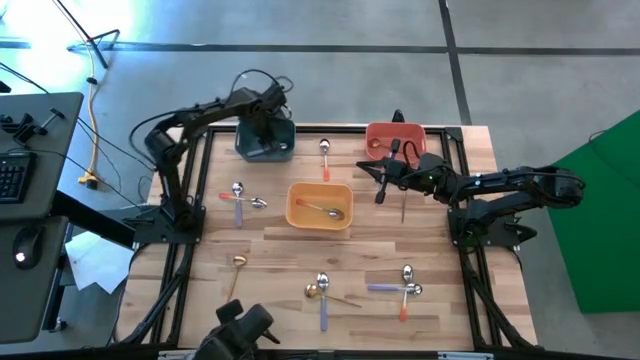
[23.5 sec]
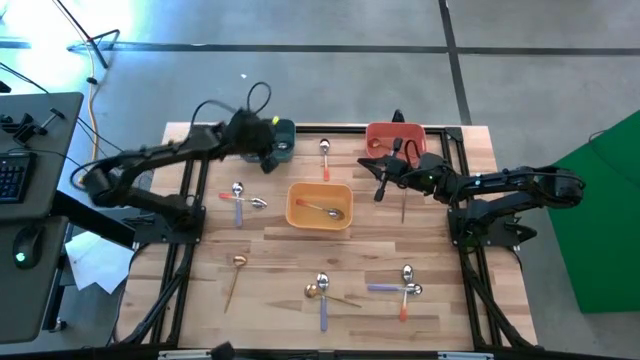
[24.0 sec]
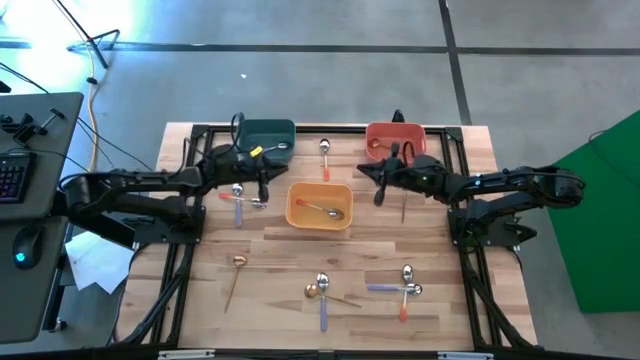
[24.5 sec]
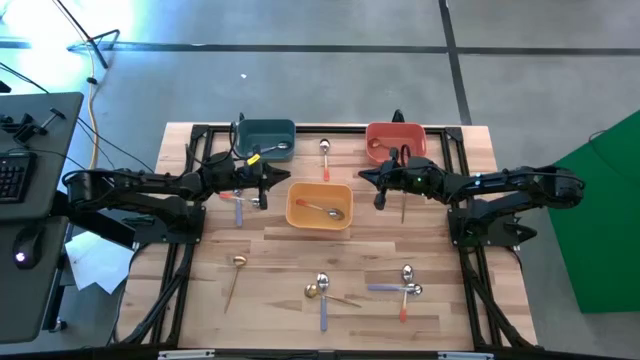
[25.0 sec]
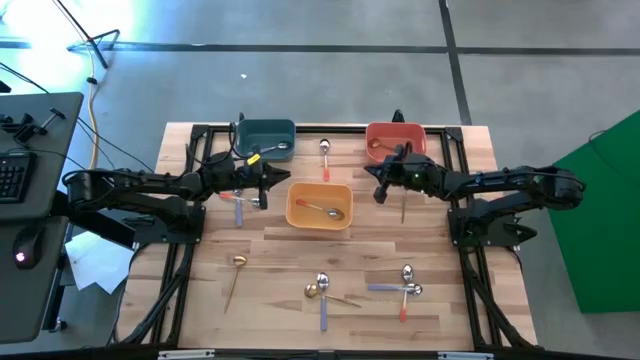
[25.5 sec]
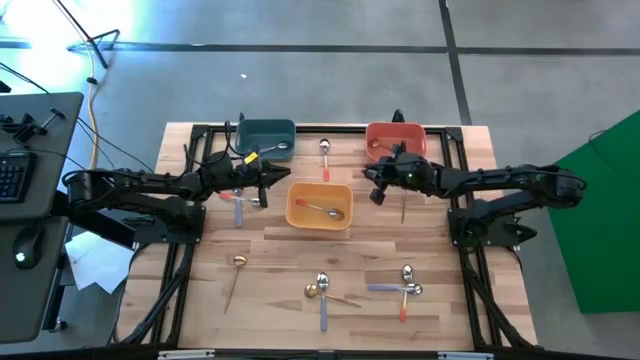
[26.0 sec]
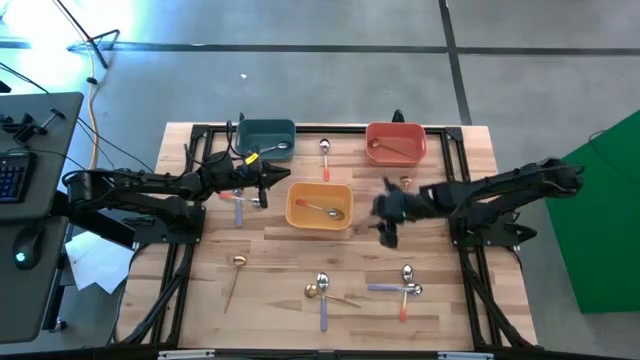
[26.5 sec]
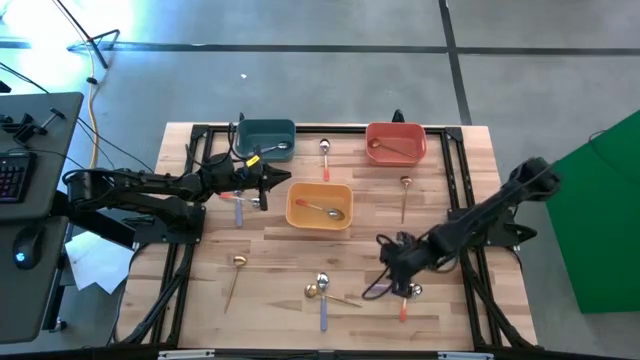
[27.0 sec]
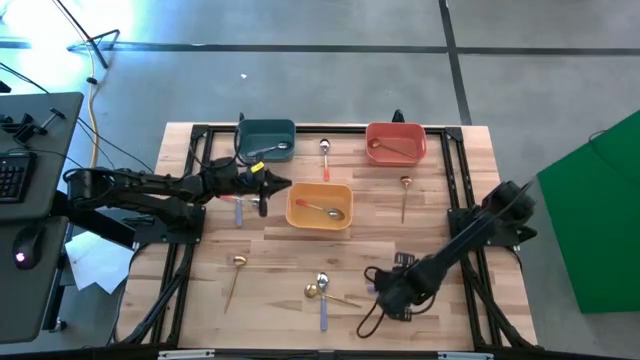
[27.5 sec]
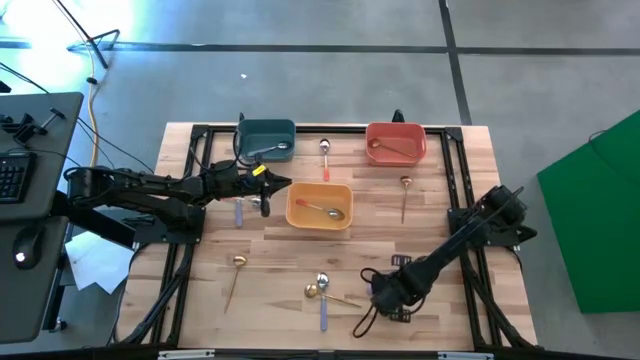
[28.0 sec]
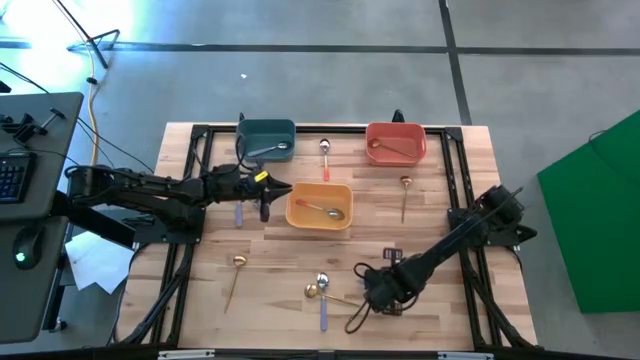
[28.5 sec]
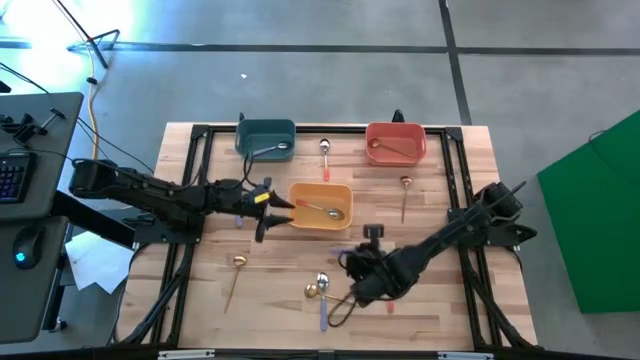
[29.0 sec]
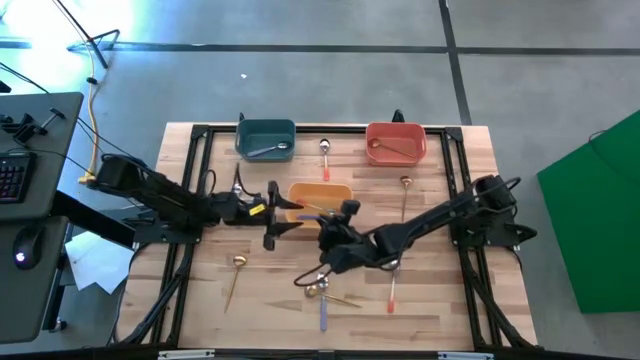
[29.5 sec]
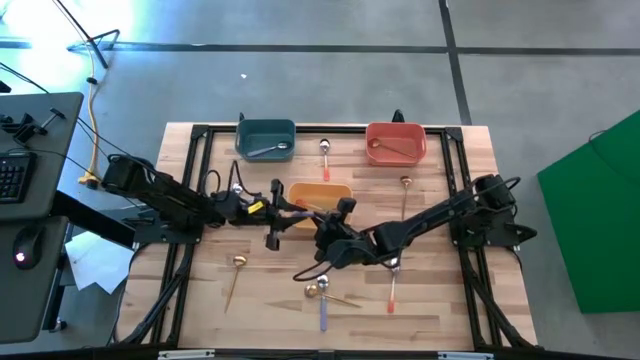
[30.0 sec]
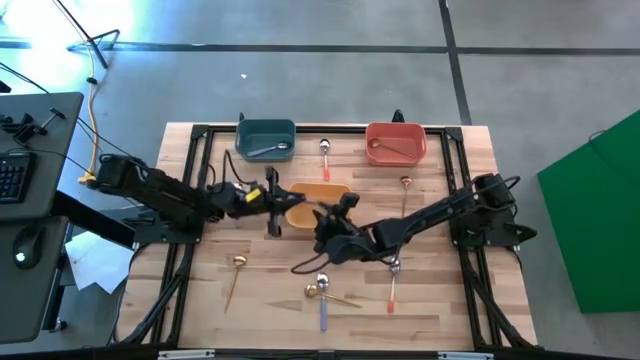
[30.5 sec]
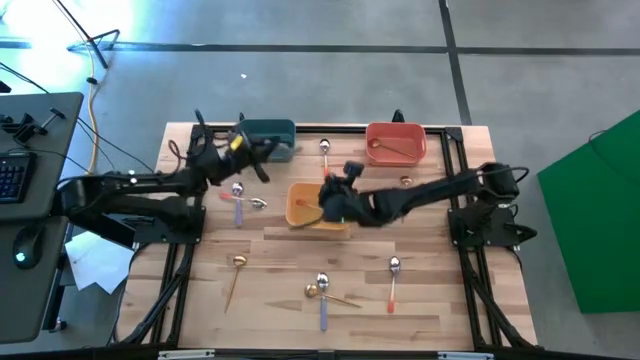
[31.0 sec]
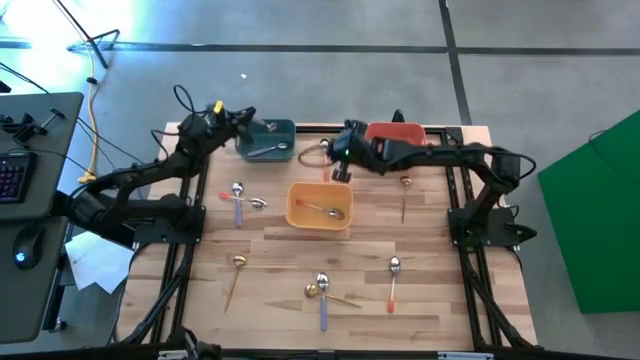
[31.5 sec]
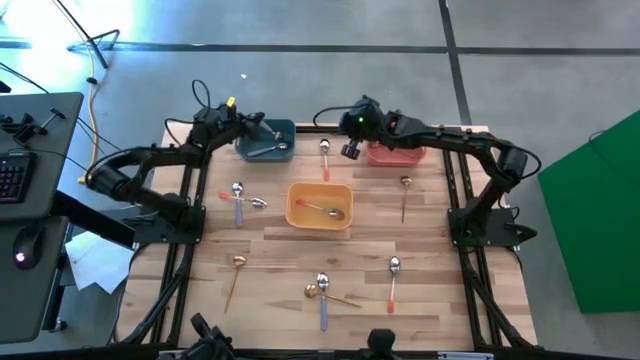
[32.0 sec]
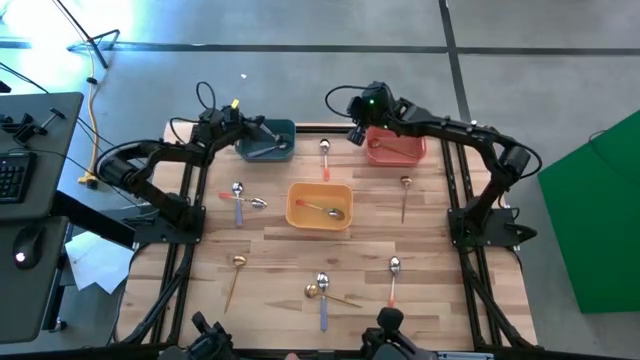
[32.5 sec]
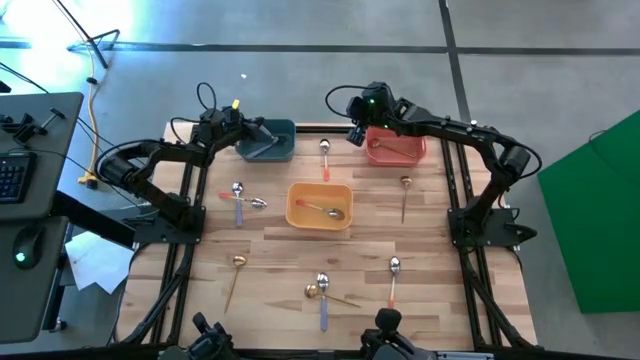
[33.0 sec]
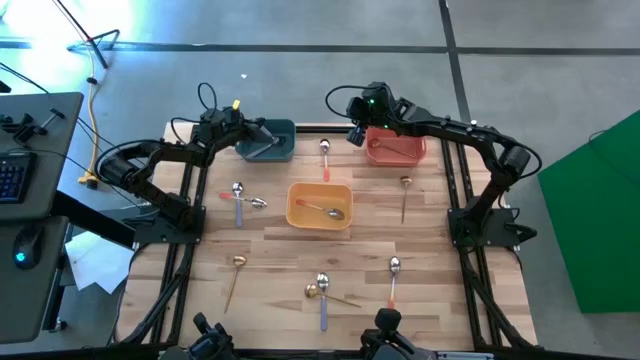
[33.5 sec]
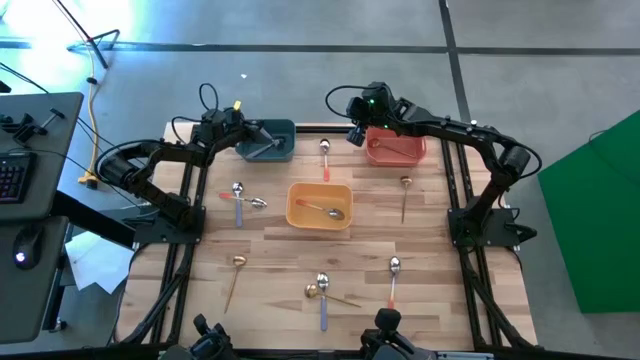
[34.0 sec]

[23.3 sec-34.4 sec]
Task: Sort silverware by color (type)
Put the purple spoon into the blue bin

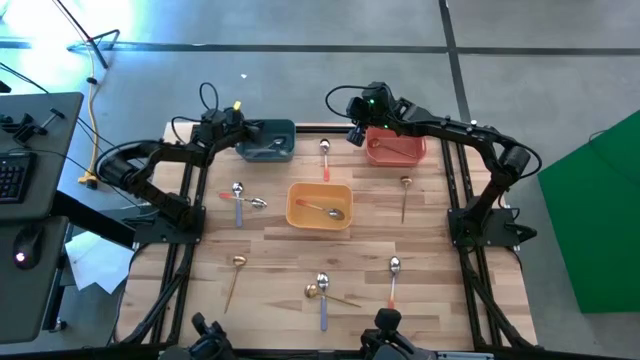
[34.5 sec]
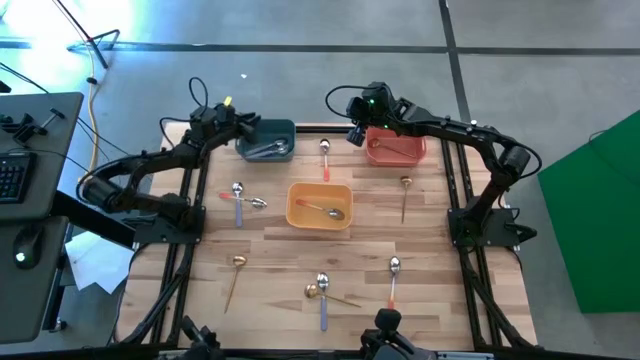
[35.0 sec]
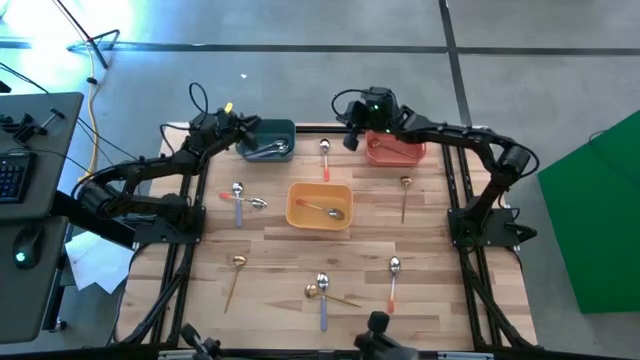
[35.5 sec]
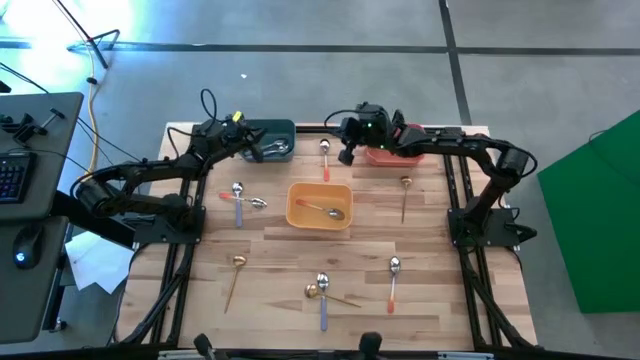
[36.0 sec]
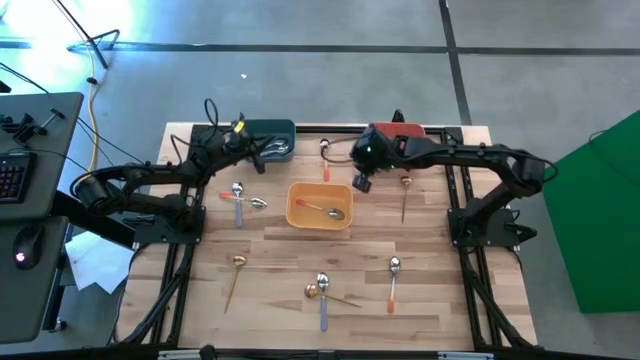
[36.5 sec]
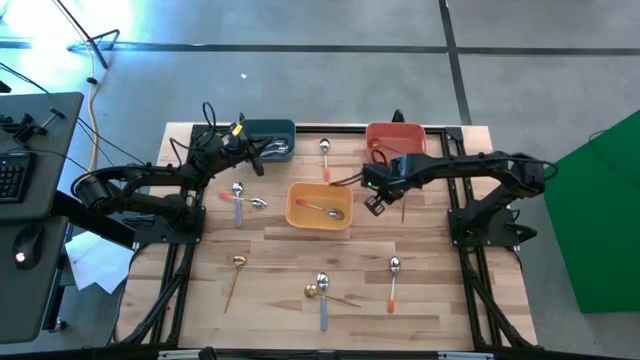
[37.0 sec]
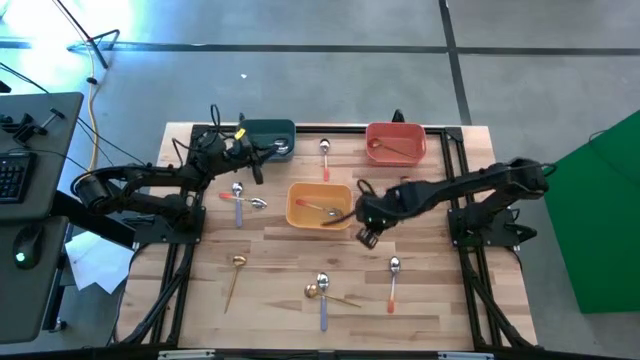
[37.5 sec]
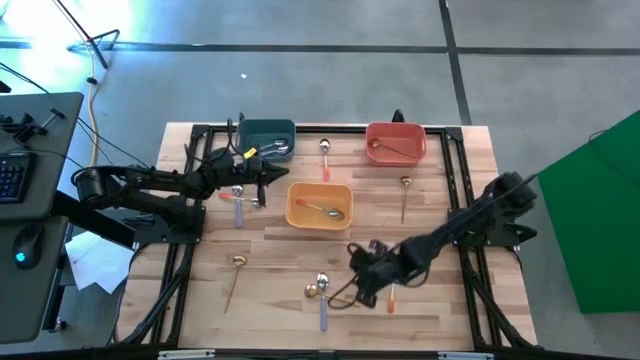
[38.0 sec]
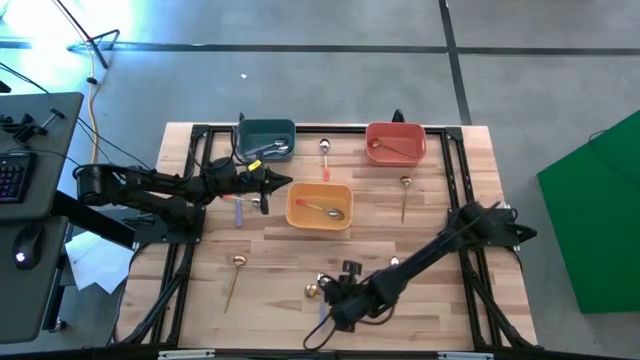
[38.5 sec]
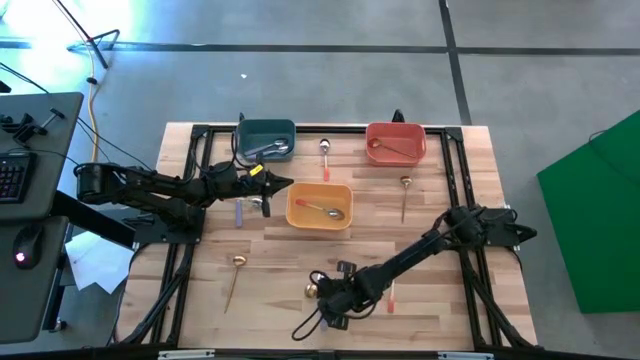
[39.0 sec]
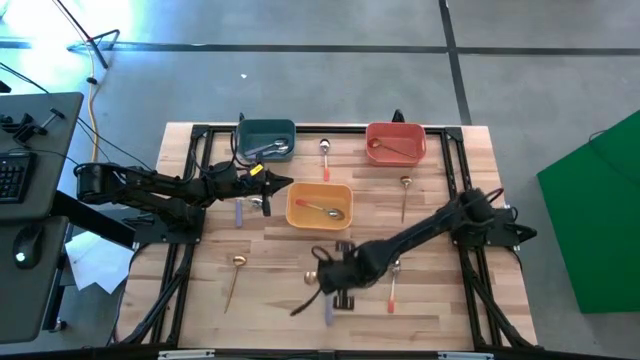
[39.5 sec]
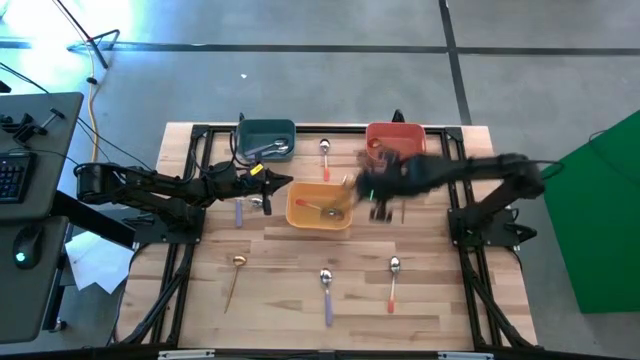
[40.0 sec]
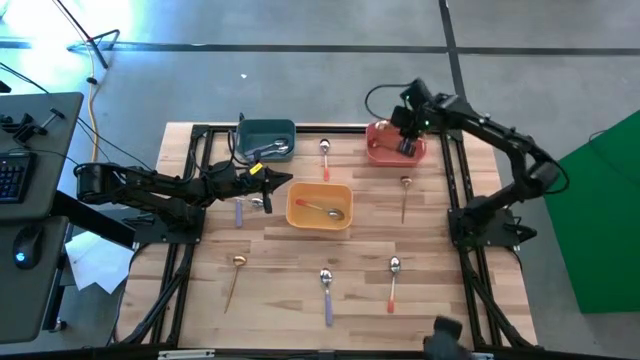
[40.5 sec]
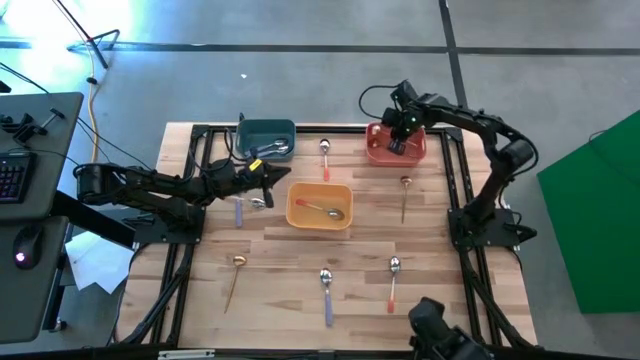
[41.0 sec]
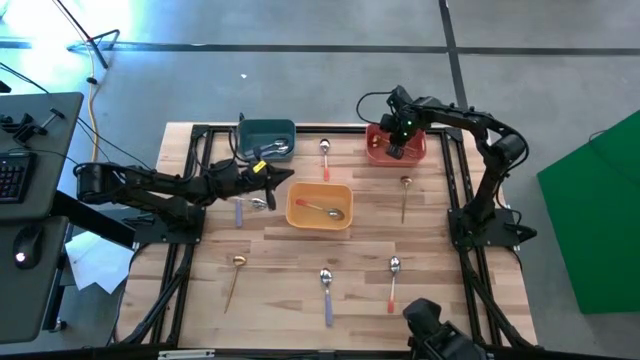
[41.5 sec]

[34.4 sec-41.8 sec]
Put the gold spoon into the orange bin

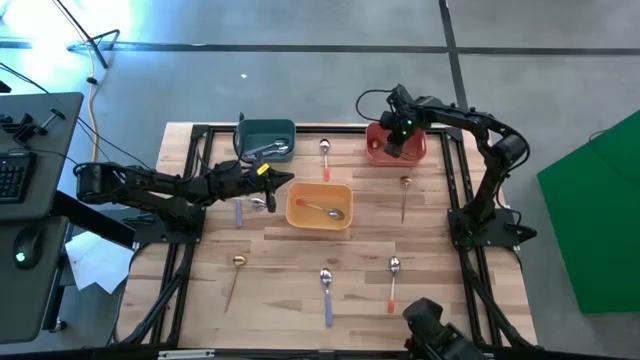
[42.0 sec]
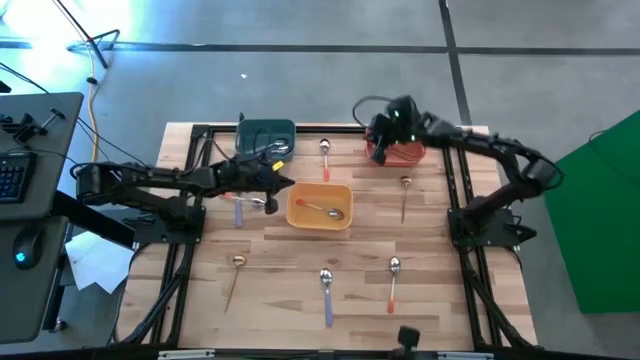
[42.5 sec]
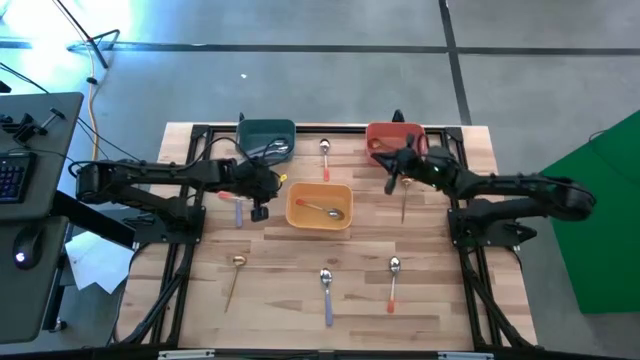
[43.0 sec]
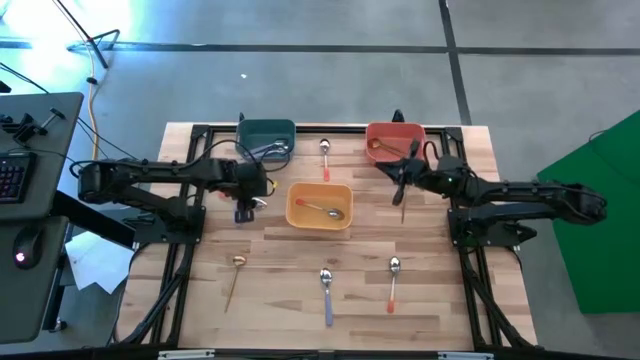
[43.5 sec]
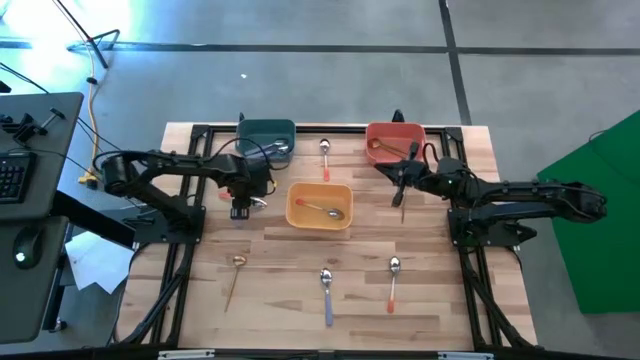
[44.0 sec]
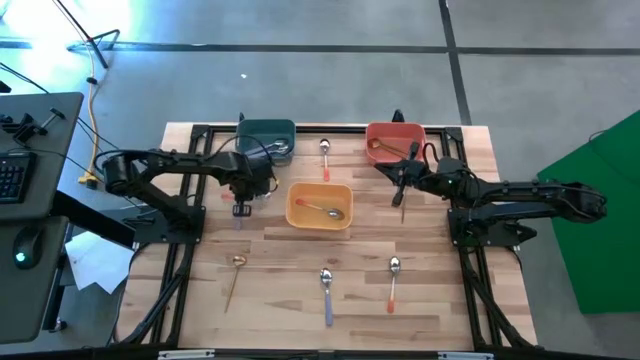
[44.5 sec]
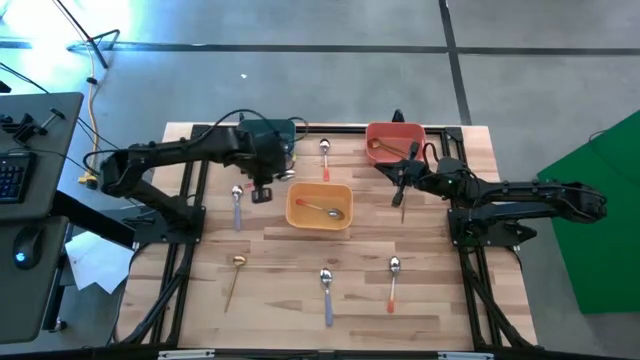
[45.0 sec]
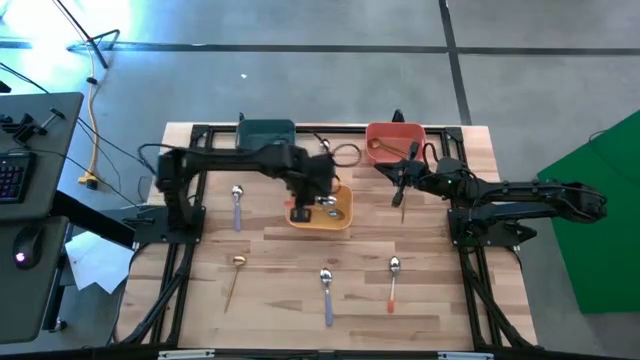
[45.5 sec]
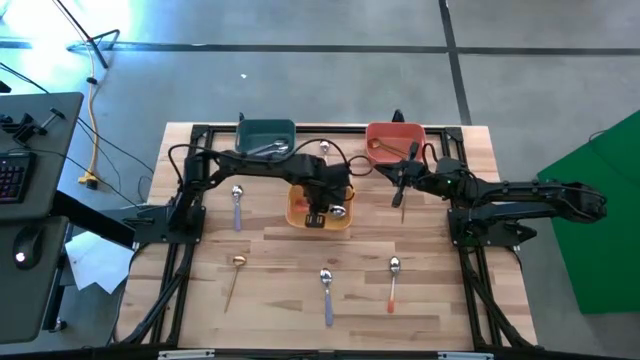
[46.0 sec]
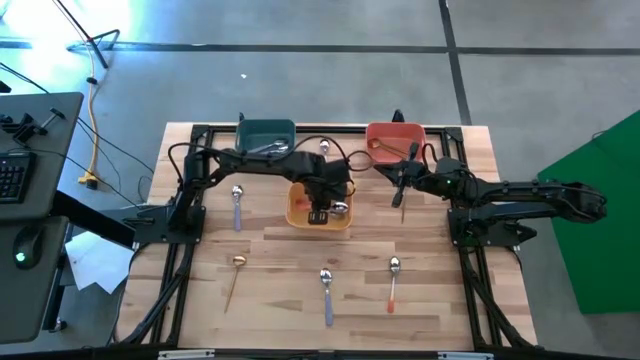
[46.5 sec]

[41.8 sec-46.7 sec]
Put the orange spoon into the yellow bin
